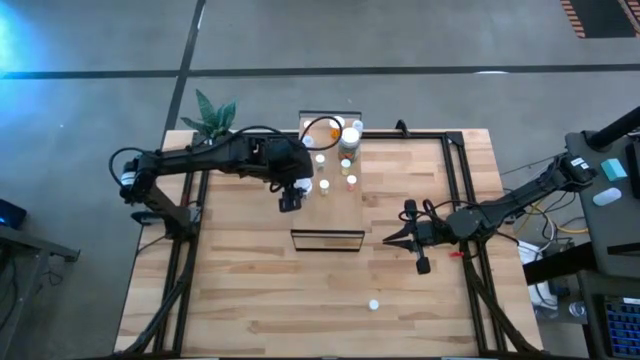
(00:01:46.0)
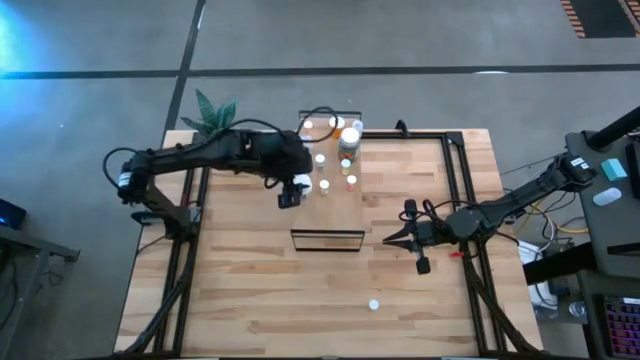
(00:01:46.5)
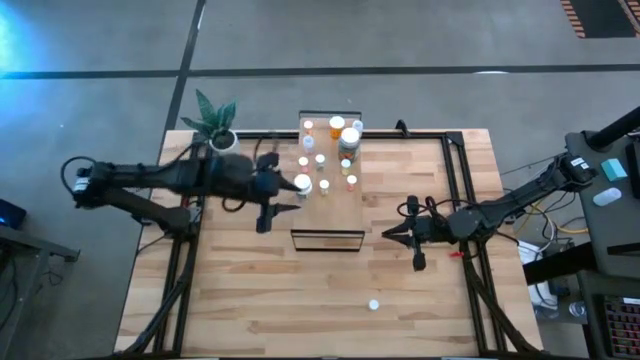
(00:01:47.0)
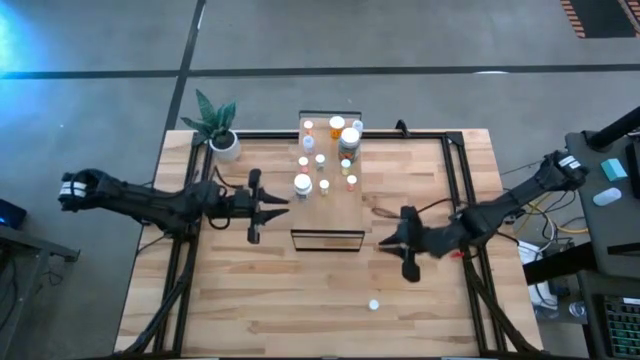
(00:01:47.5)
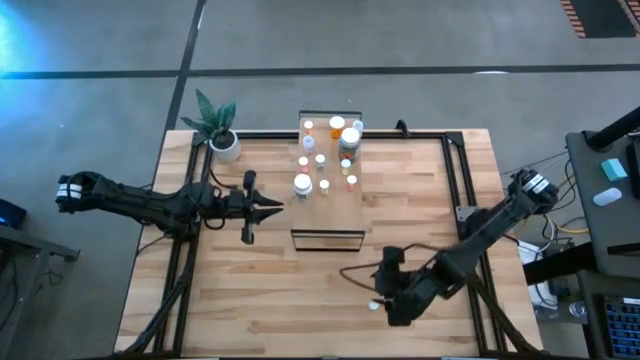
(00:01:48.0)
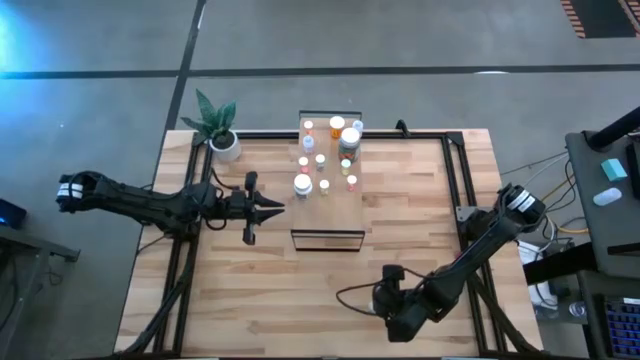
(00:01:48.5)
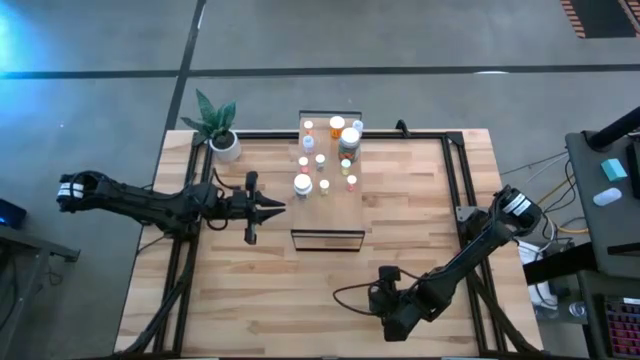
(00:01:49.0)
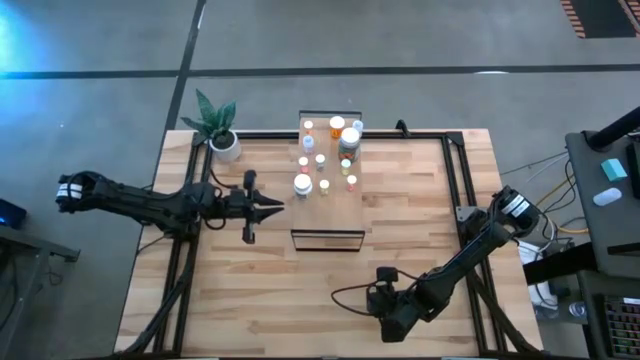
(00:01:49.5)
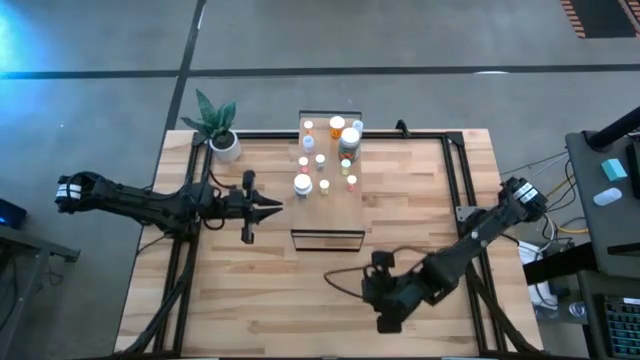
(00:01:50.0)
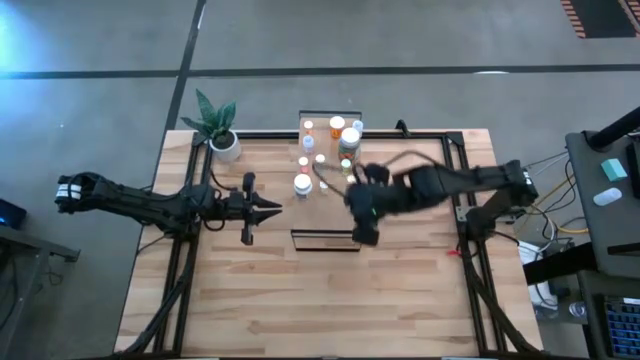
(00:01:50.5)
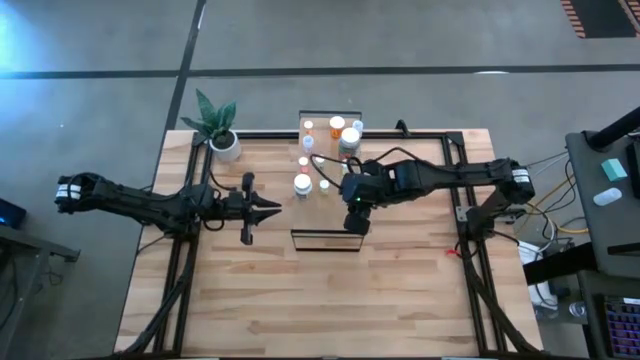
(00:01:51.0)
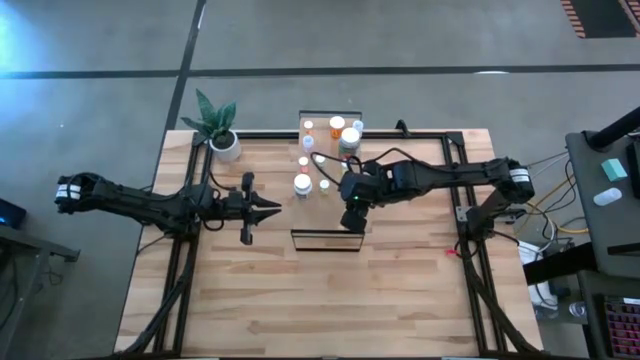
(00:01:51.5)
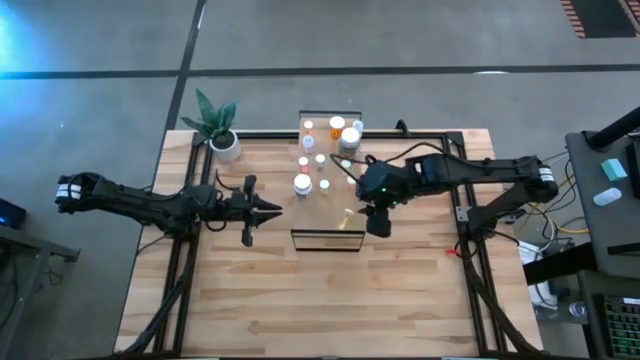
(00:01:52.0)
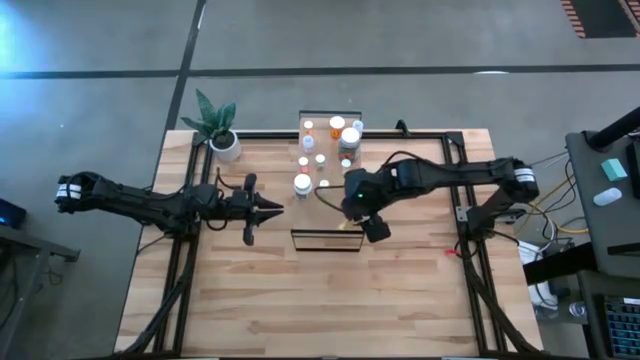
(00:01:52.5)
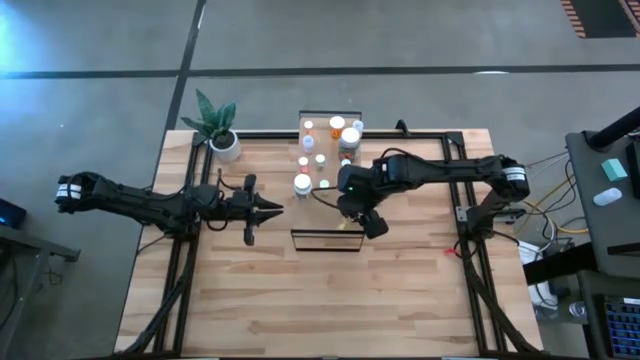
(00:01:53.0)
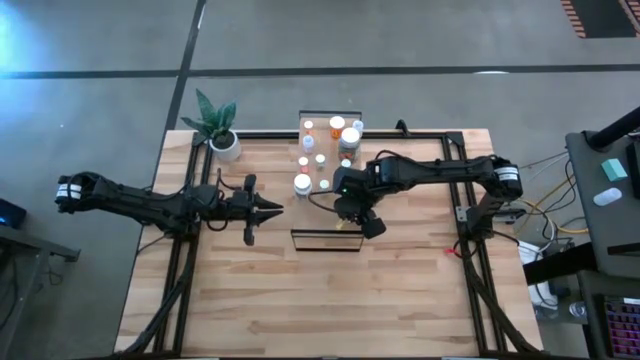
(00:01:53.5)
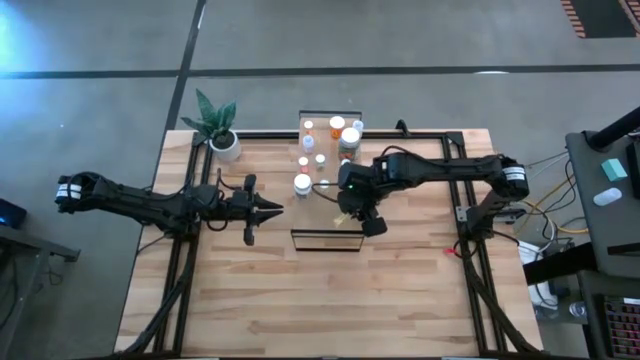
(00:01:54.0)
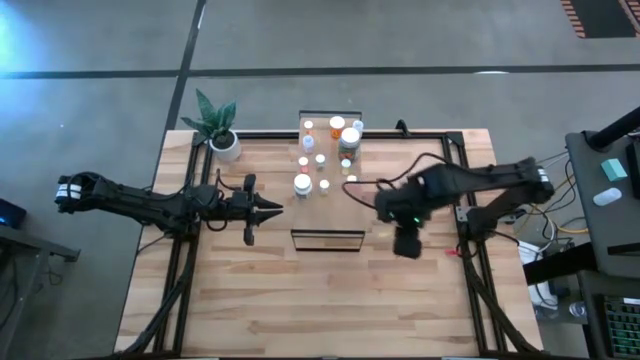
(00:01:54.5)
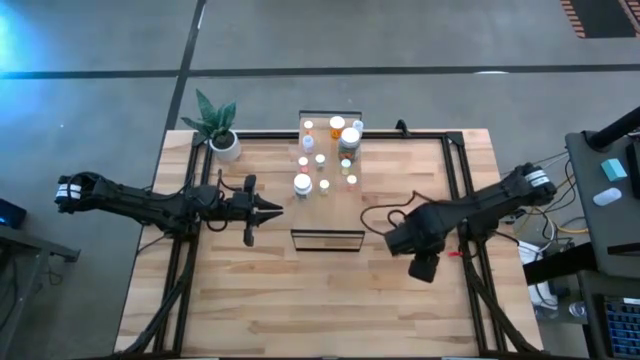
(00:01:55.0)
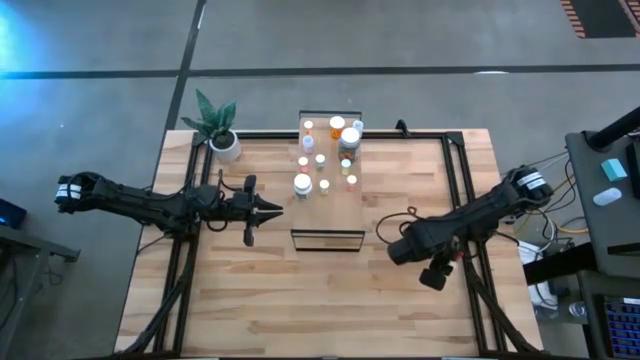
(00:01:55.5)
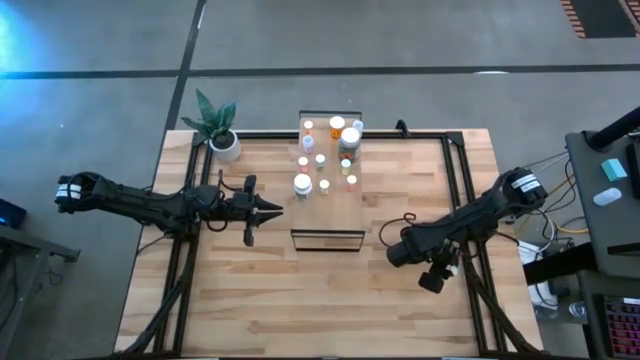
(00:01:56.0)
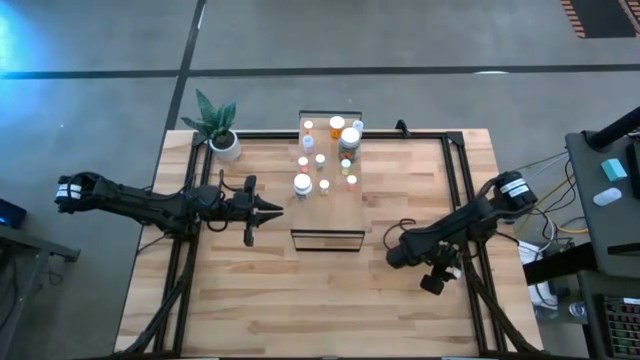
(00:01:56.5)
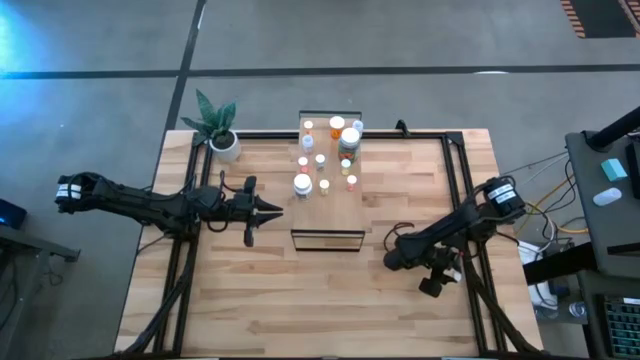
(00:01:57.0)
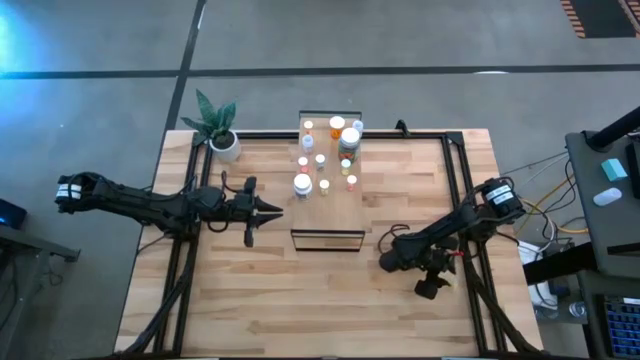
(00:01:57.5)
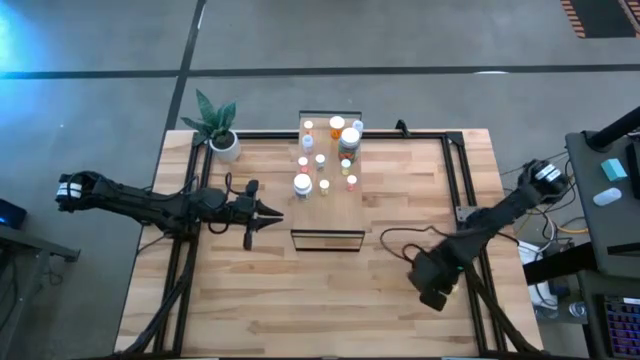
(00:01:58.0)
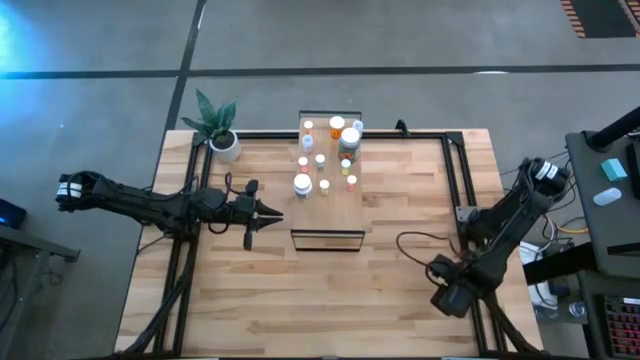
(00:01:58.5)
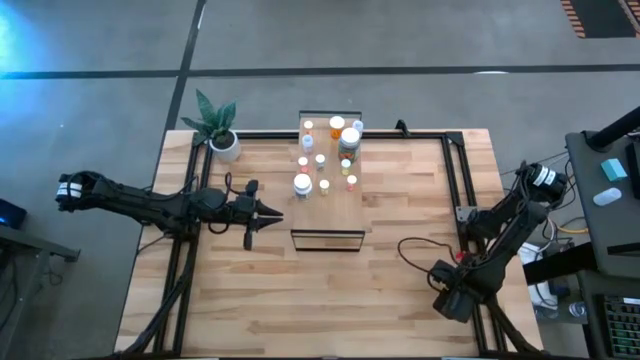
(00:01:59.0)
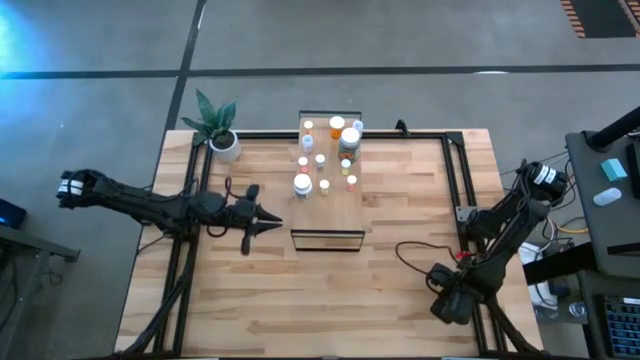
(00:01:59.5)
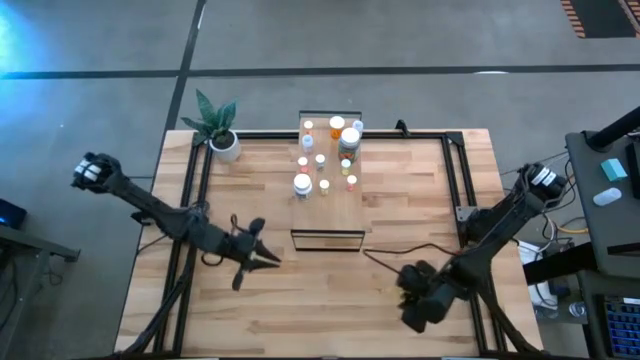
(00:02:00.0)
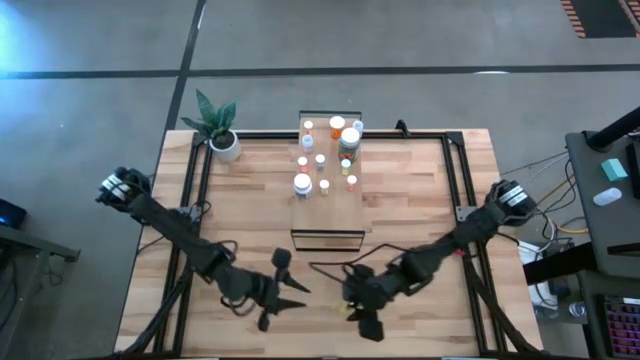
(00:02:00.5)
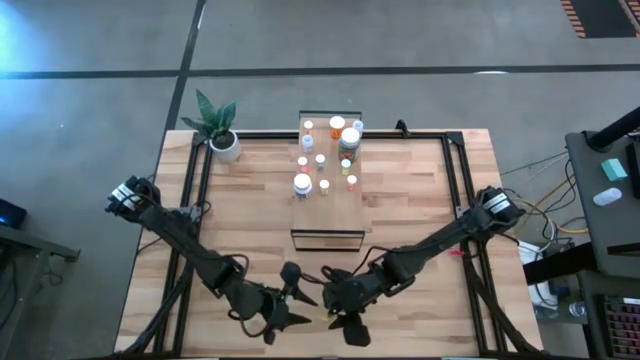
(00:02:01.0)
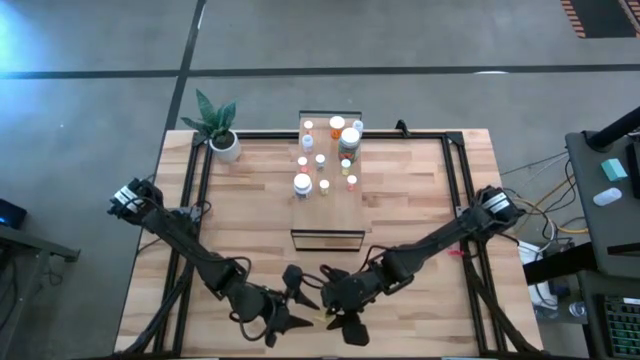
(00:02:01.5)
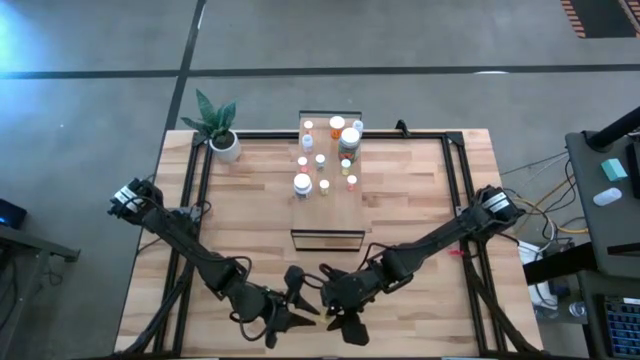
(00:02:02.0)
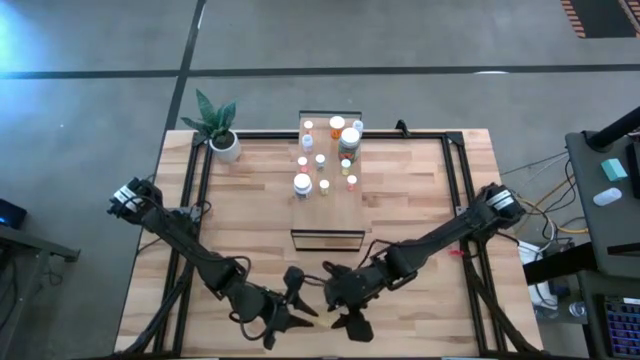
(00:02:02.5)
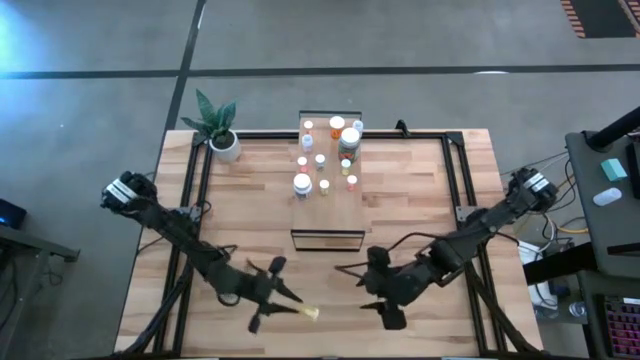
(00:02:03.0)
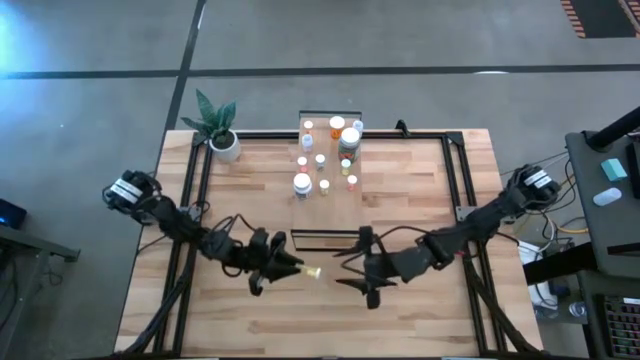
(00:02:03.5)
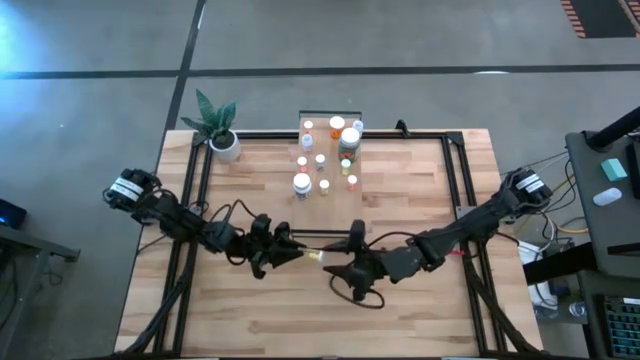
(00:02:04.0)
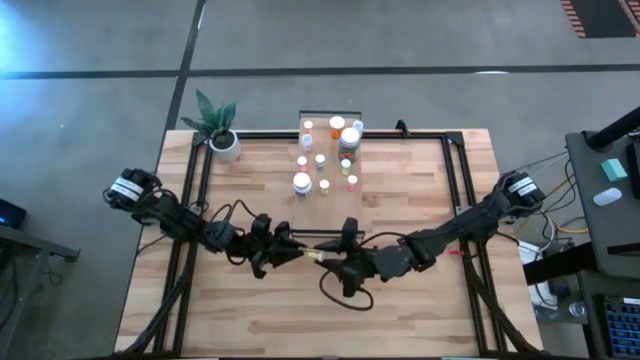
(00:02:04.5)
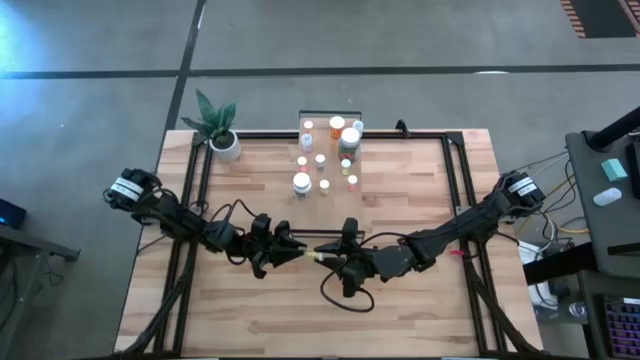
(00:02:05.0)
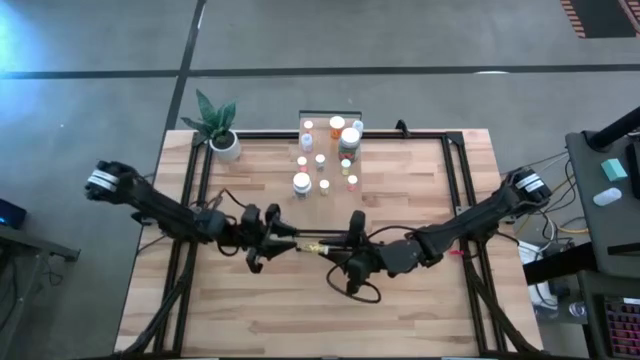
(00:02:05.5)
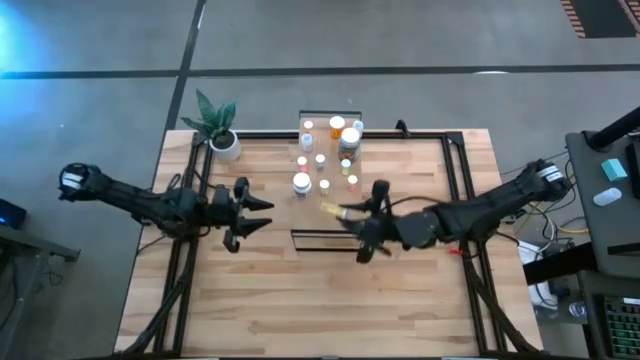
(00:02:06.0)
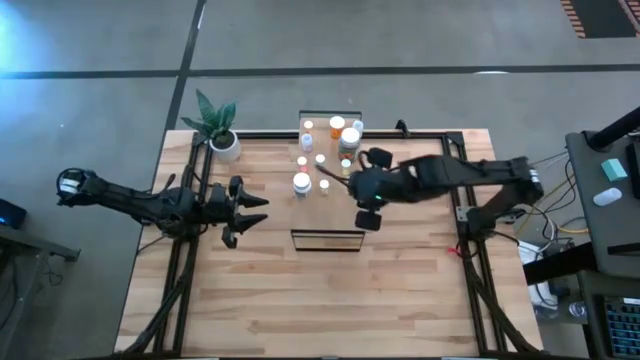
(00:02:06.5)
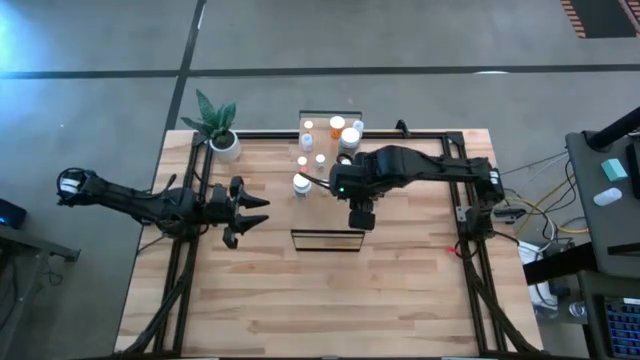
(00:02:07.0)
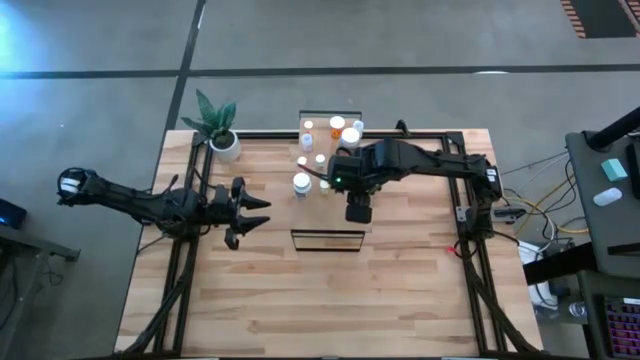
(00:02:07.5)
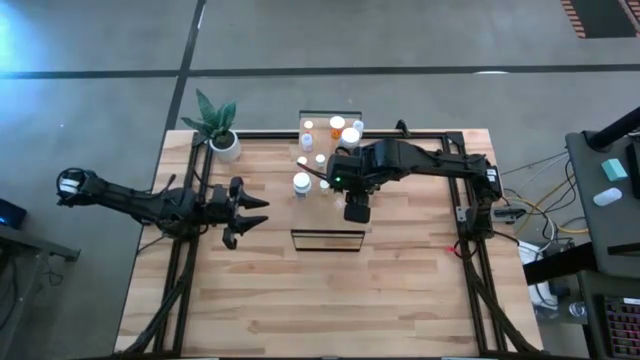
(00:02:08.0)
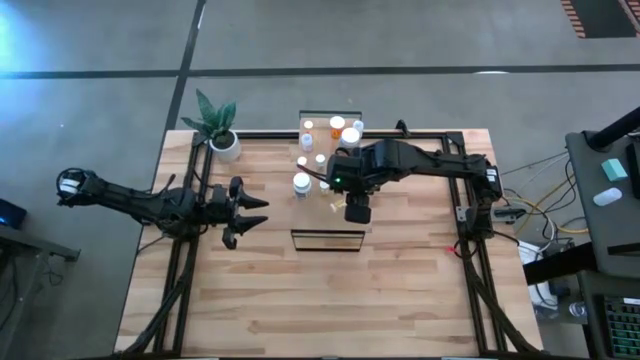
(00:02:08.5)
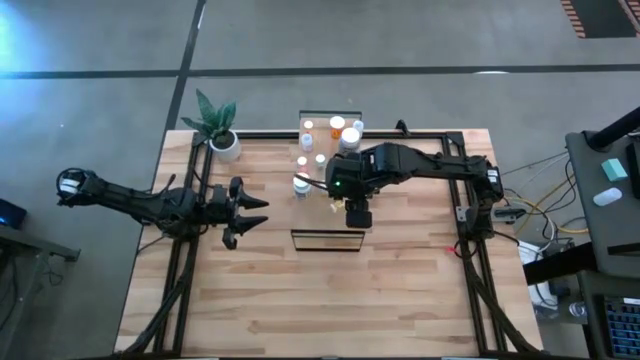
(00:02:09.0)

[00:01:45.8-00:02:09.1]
Task: Pick and place medicine bottles onto shelf by color
Put the yellow pill bottle on the shelf
